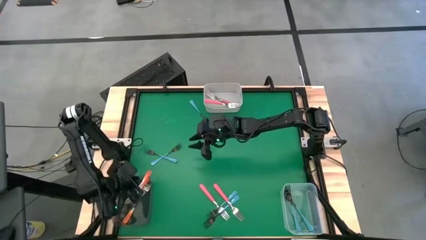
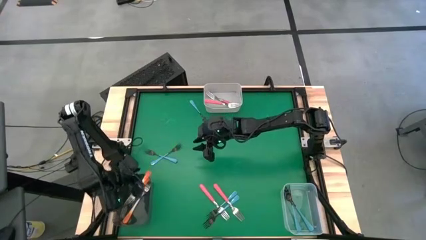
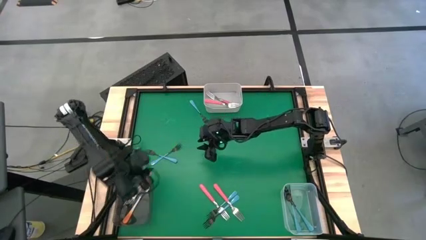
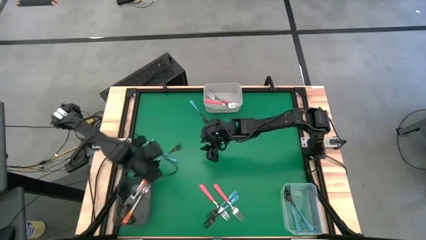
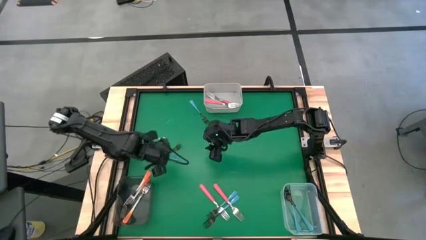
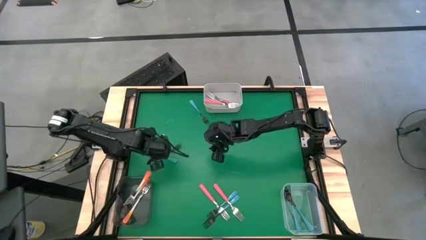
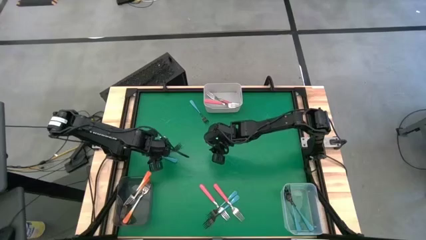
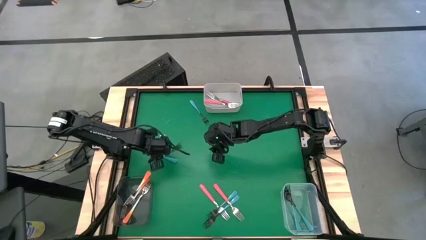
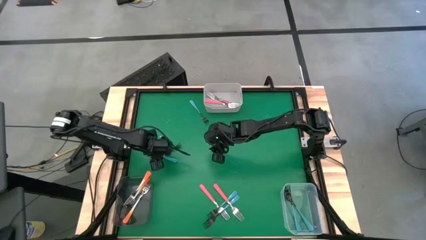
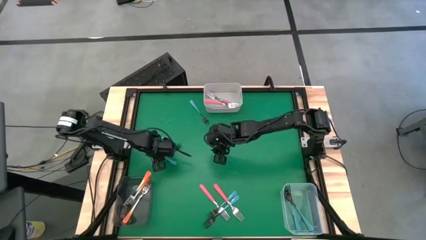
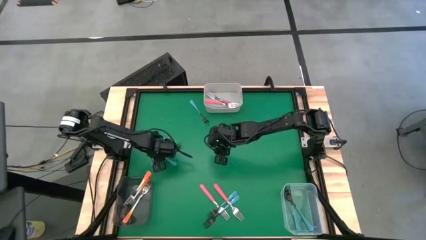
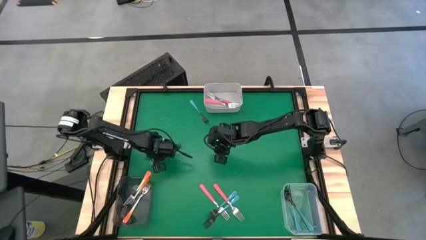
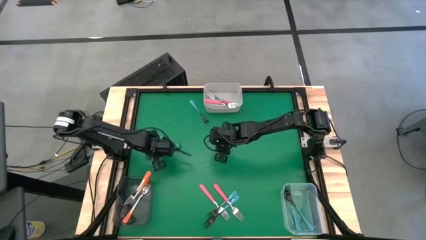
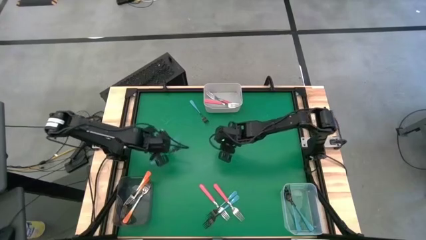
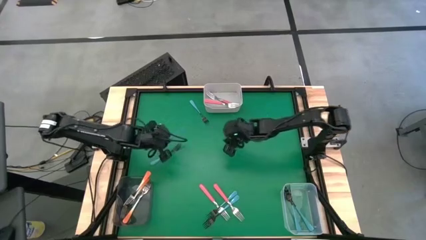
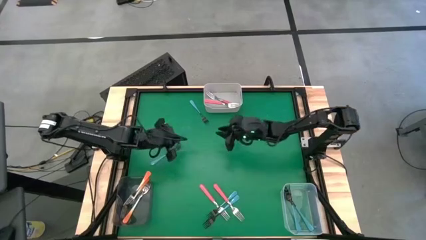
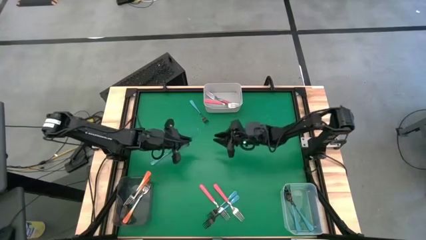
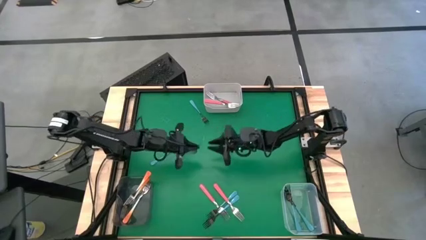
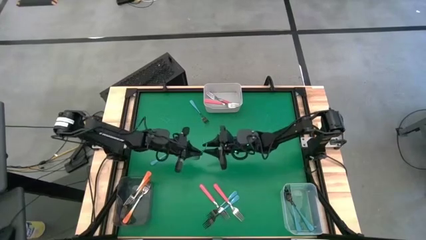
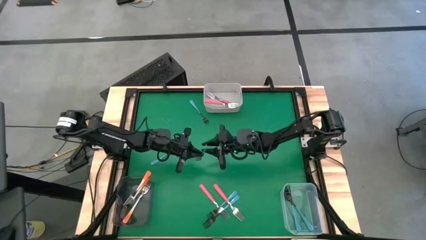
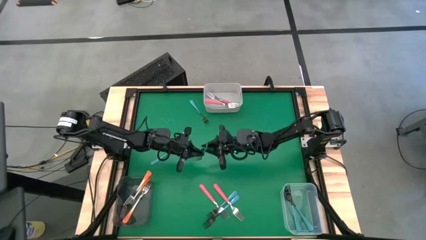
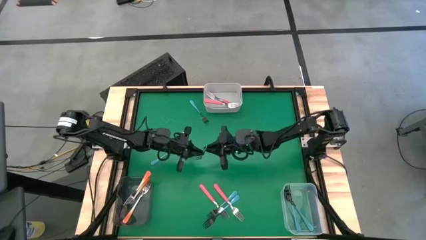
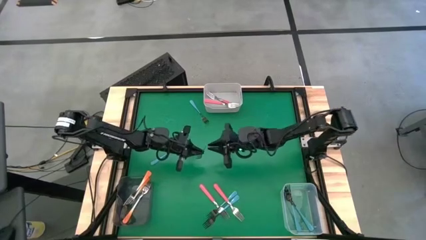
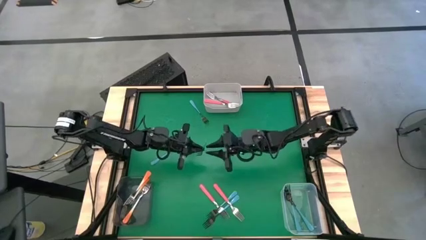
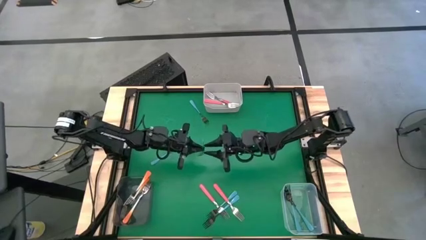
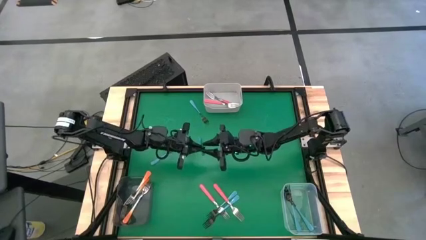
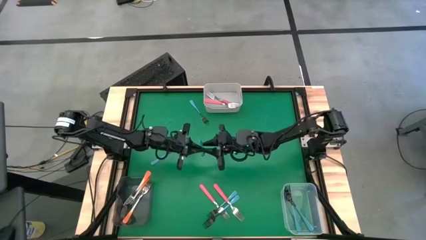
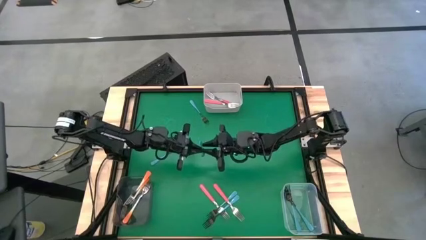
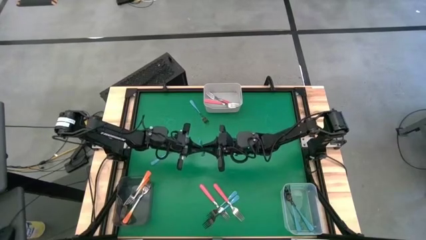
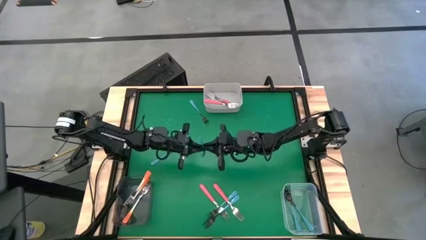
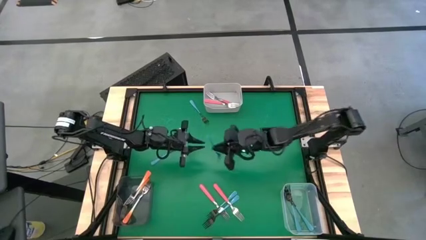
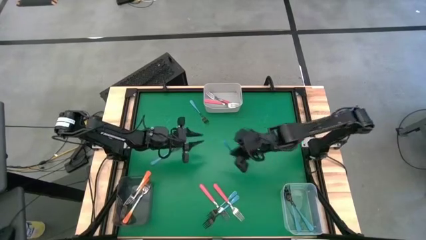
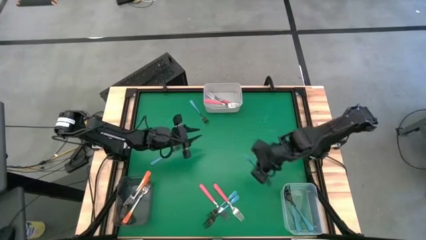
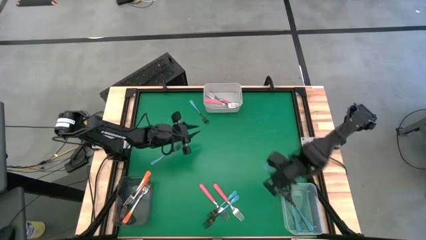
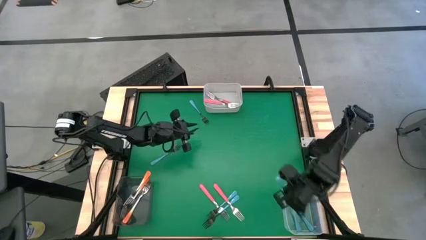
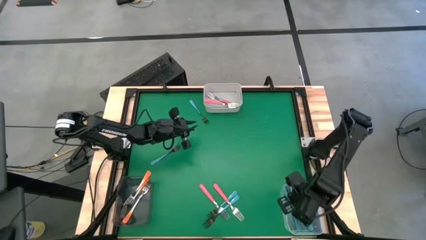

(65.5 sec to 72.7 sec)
Task: Sort silverware by color (type)
Put the blue fork into the transparent bin

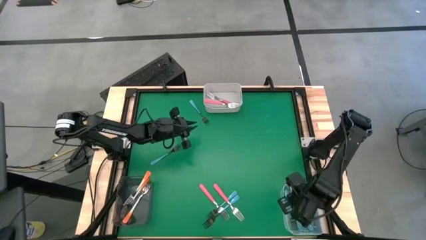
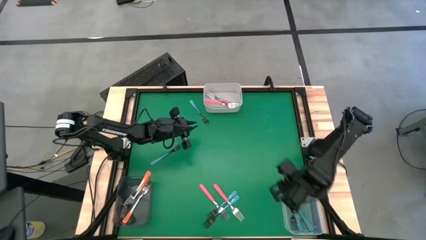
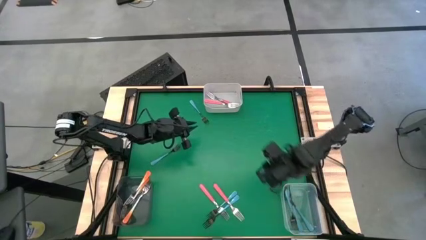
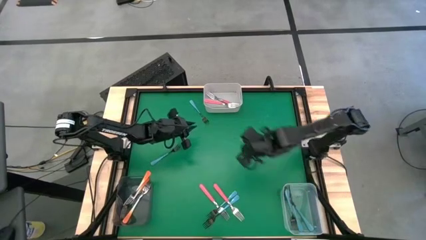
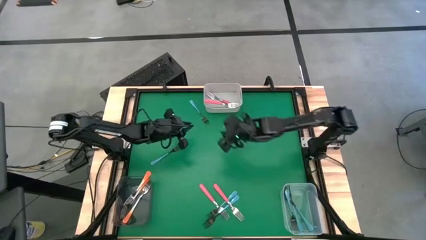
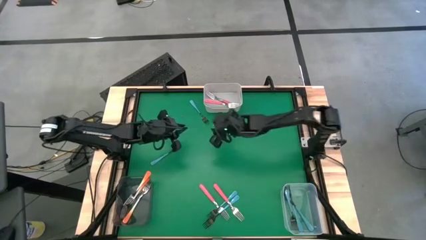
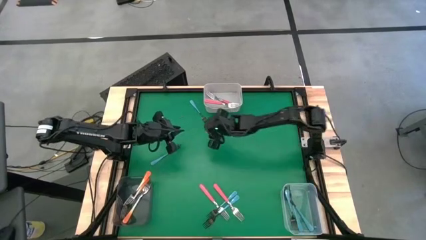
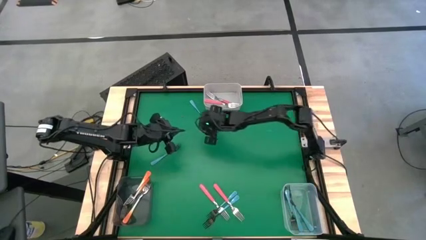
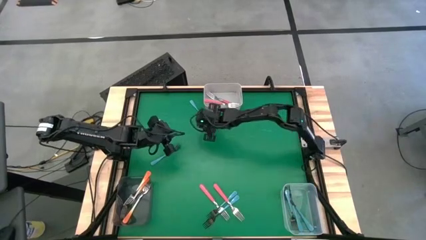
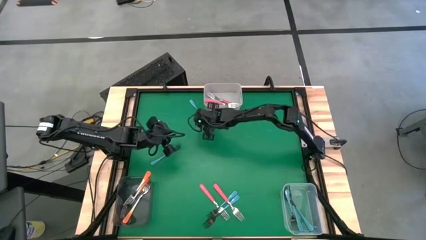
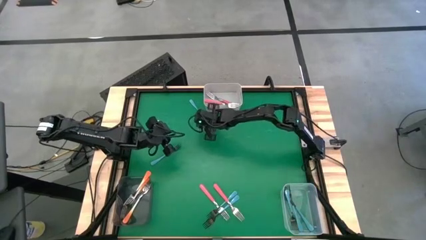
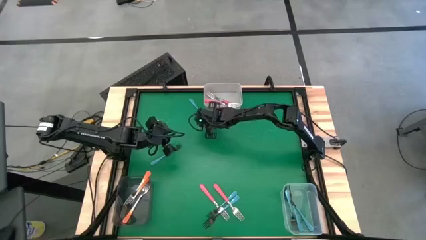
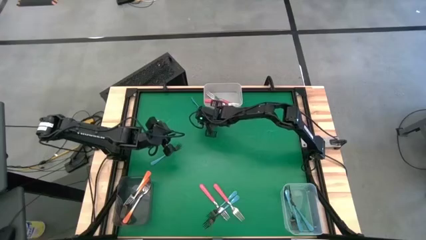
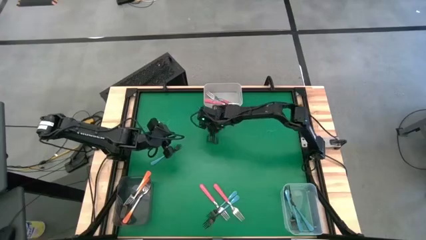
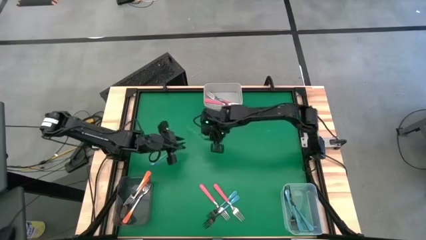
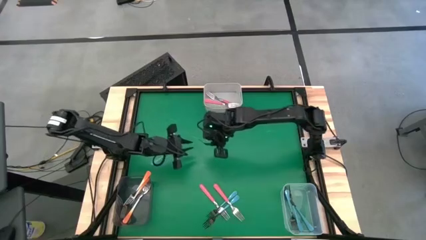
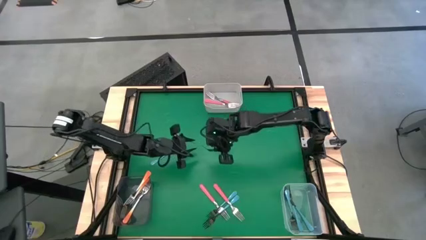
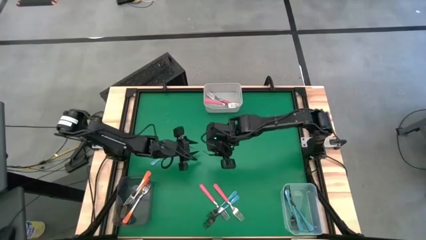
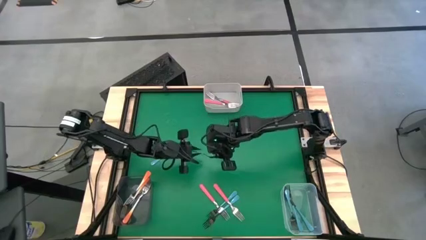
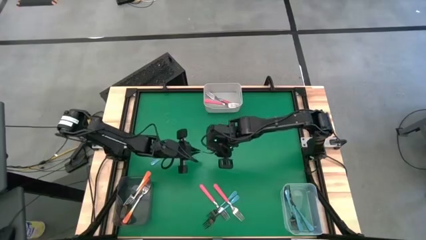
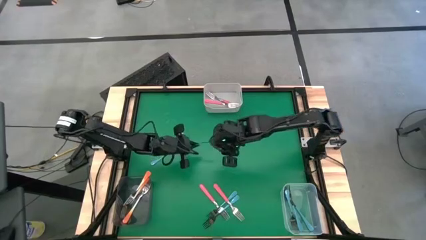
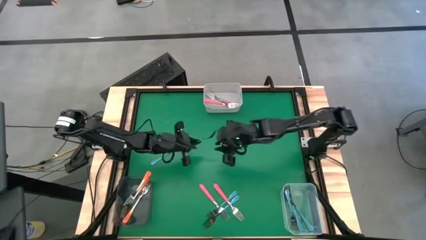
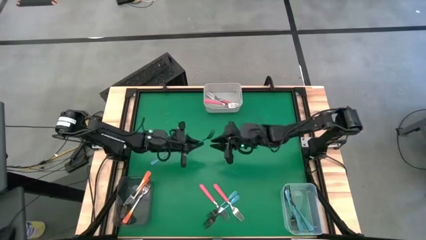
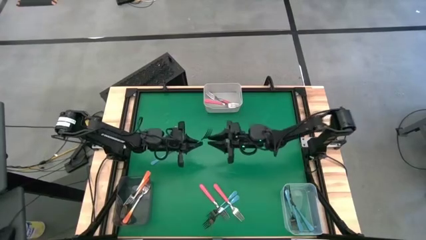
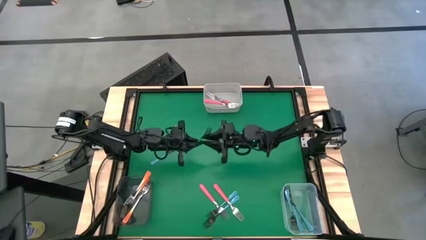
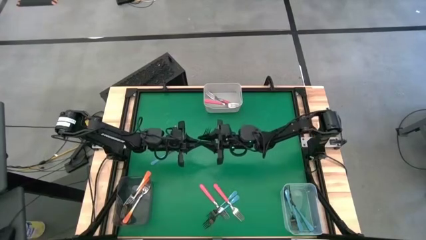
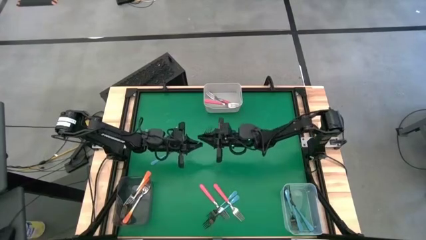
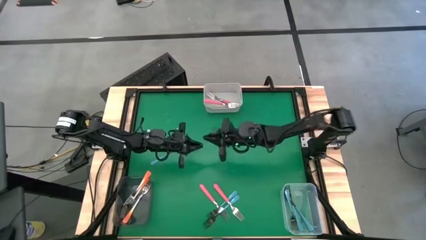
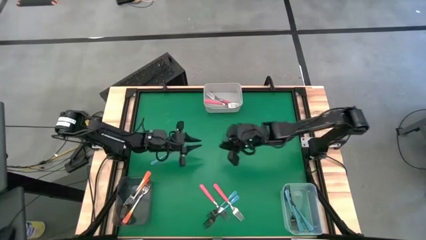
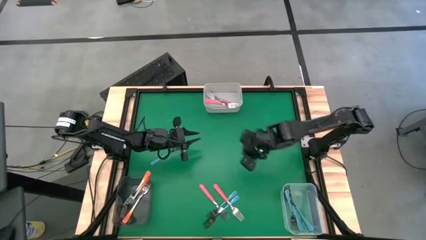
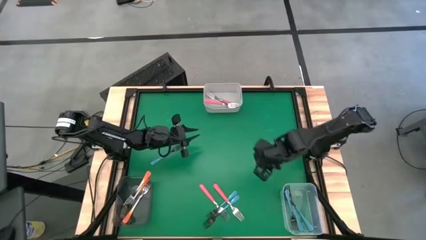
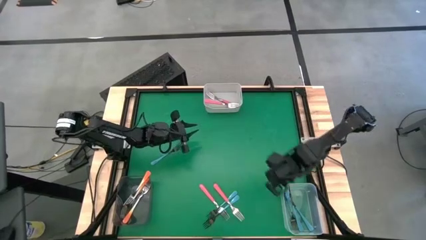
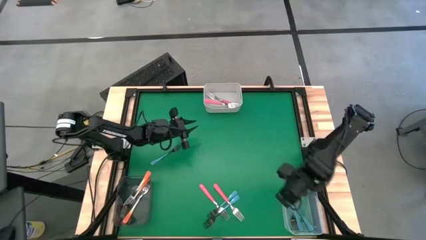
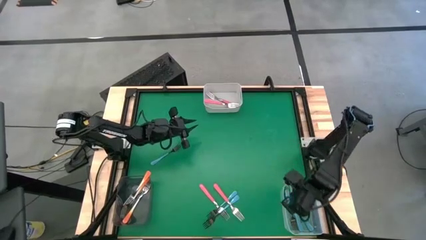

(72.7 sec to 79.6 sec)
Put the blue fork into the transparent bin

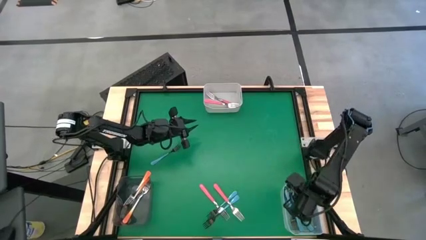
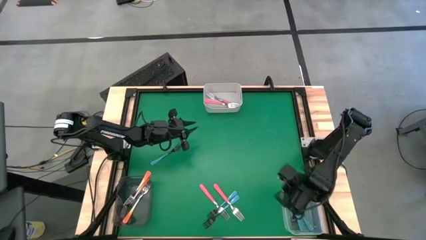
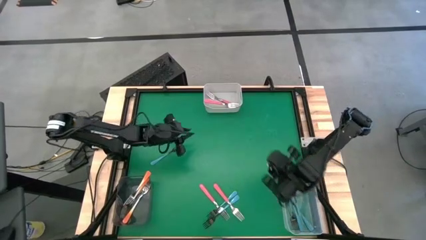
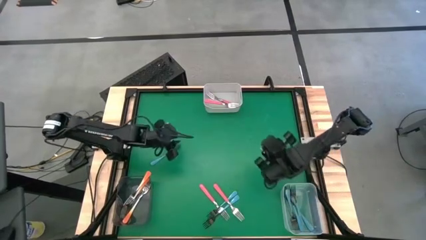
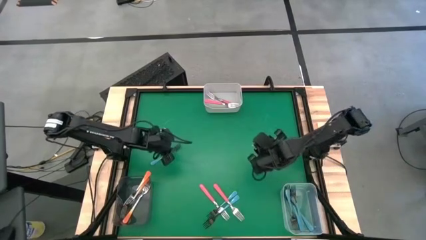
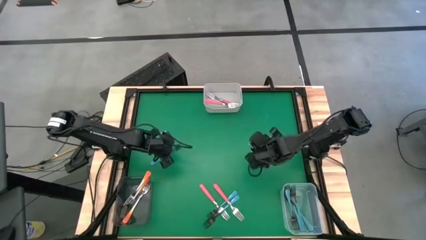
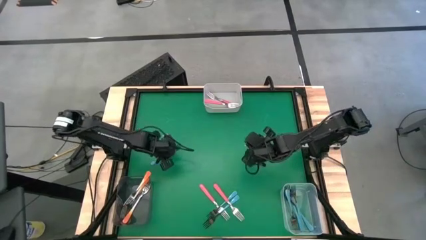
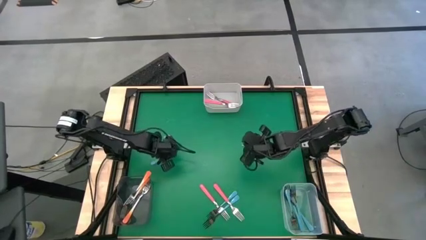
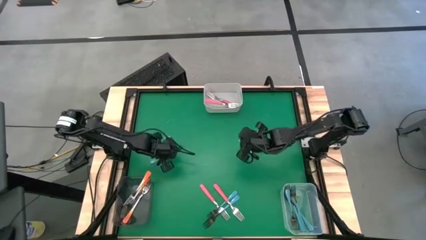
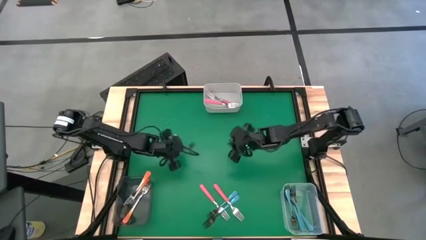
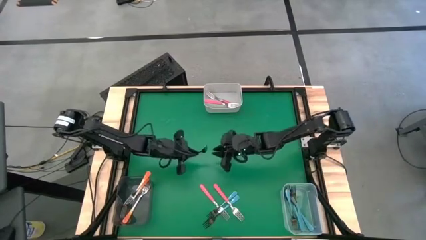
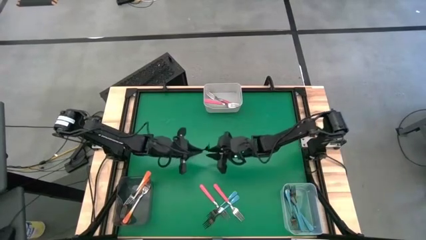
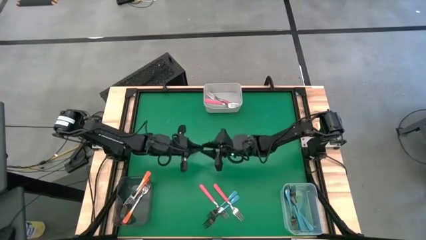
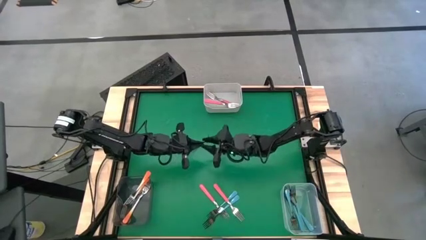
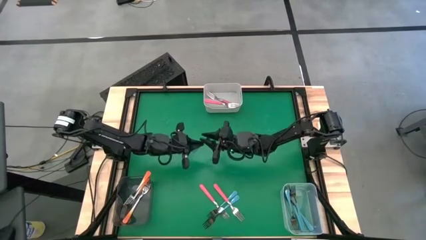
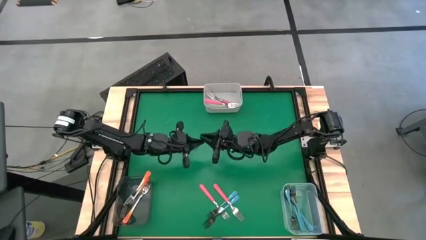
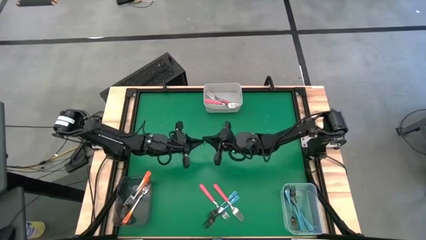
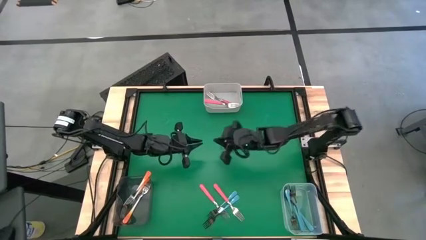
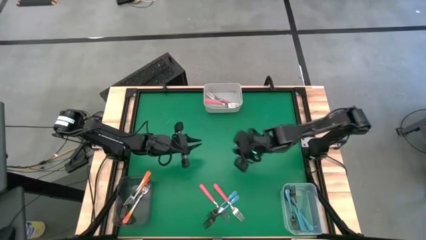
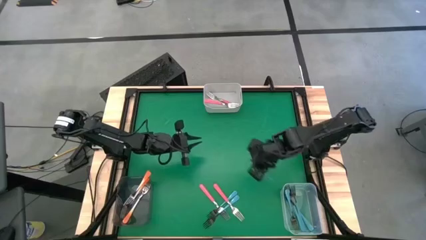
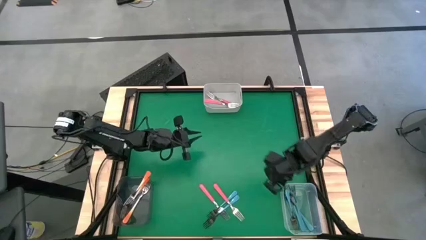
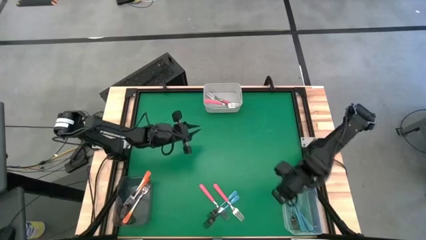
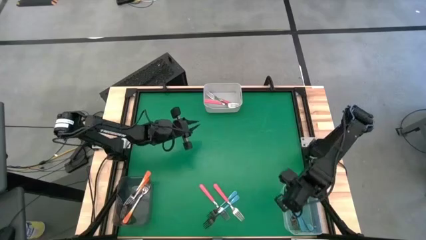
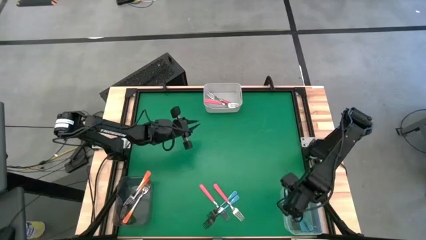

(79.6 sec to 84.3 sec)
Put the blue fork into the transparent bin
